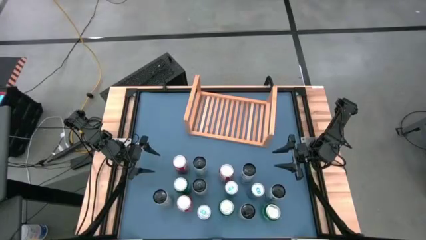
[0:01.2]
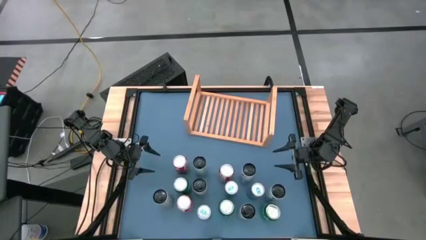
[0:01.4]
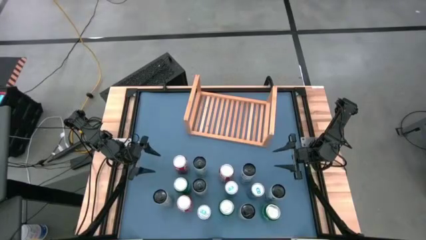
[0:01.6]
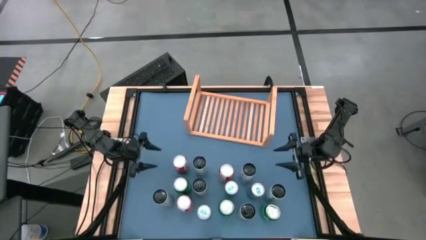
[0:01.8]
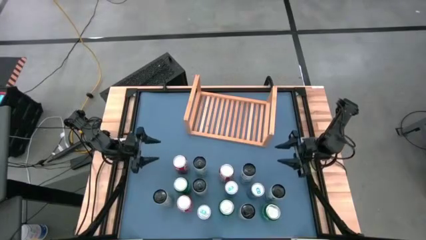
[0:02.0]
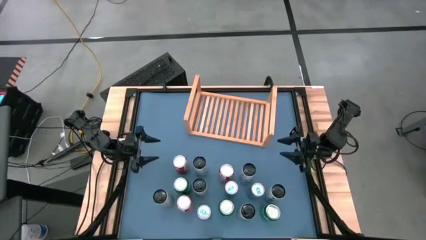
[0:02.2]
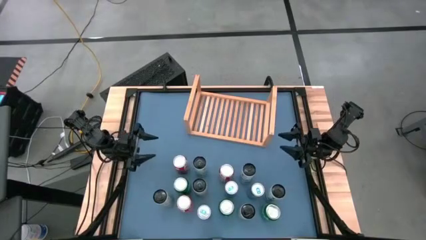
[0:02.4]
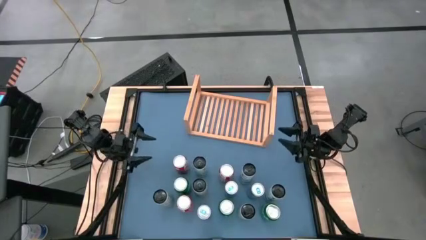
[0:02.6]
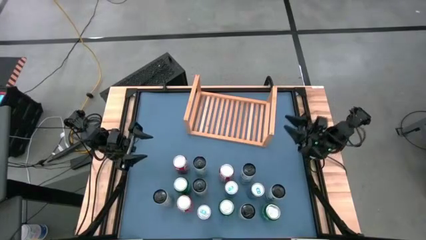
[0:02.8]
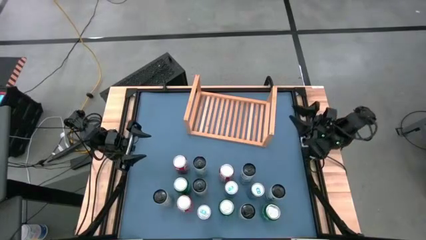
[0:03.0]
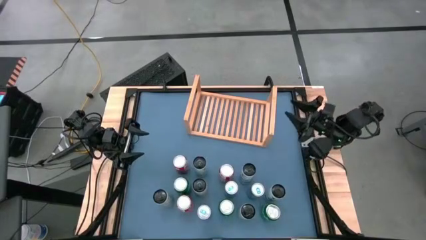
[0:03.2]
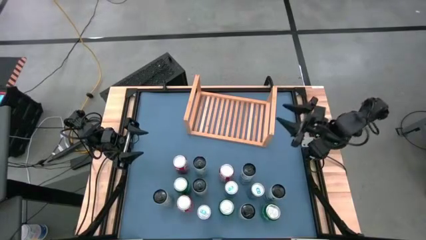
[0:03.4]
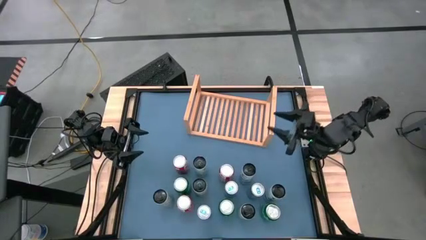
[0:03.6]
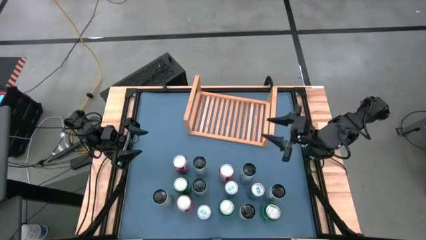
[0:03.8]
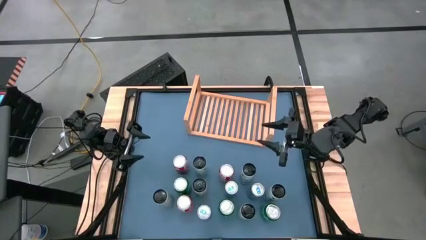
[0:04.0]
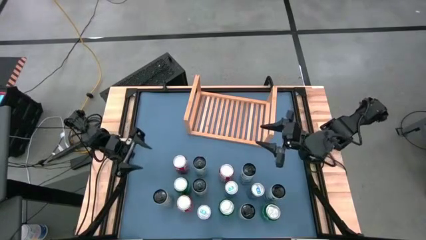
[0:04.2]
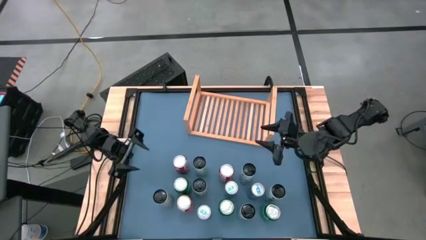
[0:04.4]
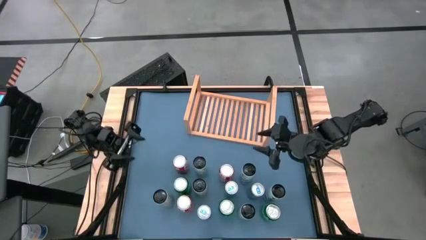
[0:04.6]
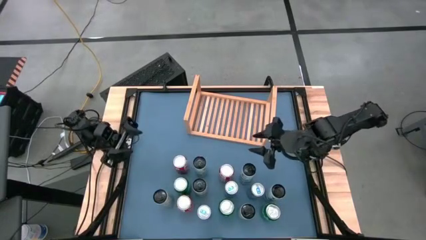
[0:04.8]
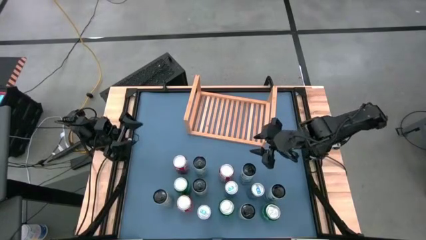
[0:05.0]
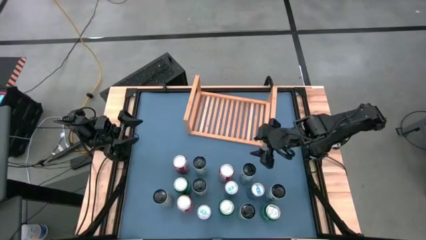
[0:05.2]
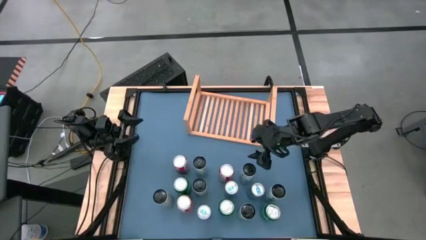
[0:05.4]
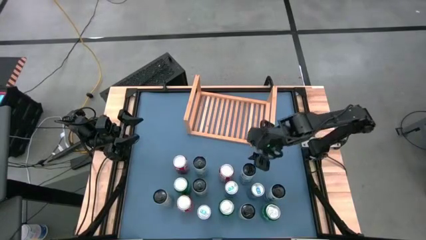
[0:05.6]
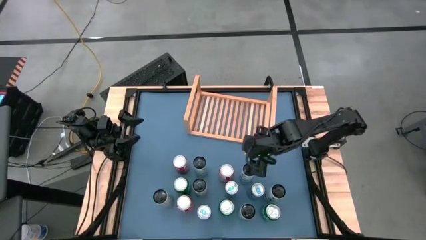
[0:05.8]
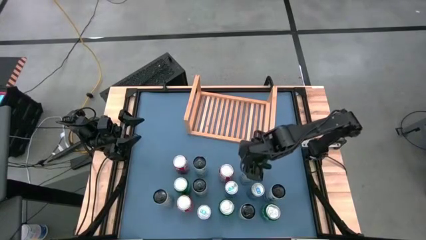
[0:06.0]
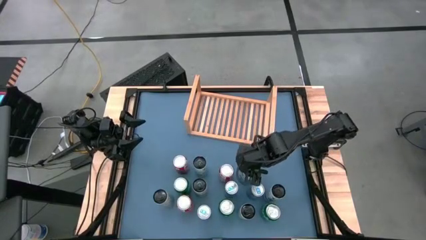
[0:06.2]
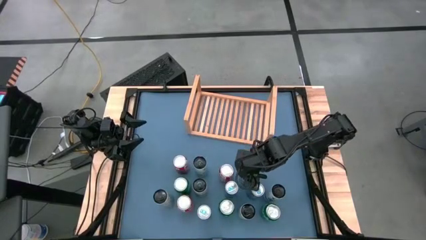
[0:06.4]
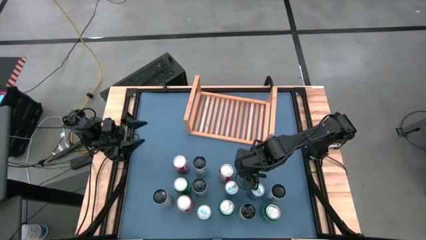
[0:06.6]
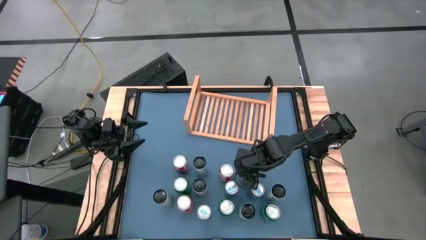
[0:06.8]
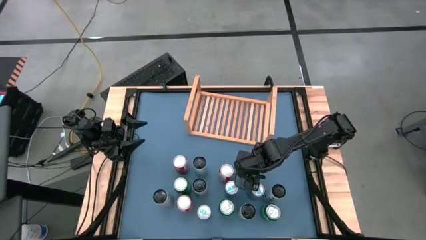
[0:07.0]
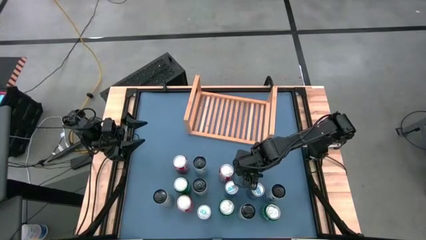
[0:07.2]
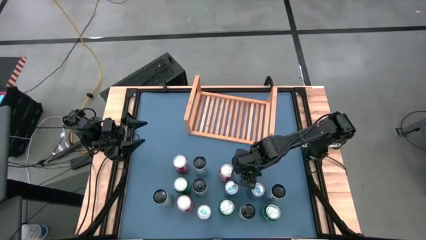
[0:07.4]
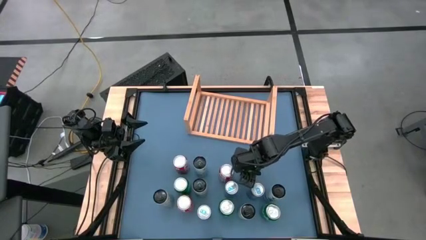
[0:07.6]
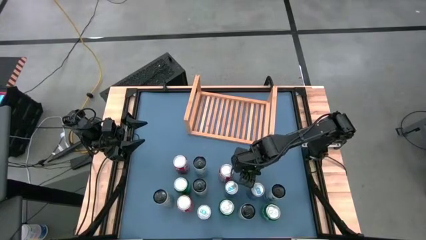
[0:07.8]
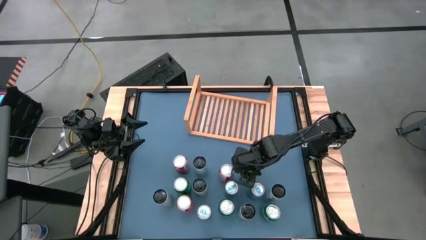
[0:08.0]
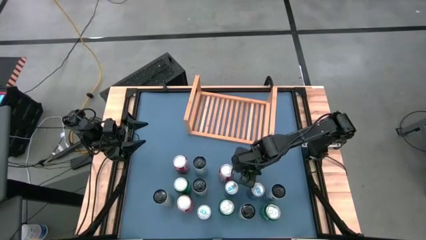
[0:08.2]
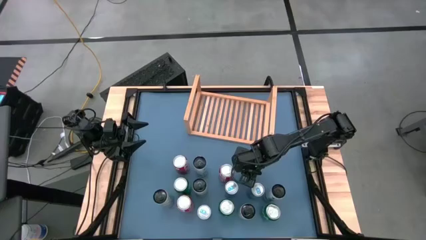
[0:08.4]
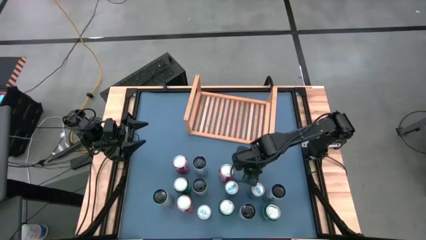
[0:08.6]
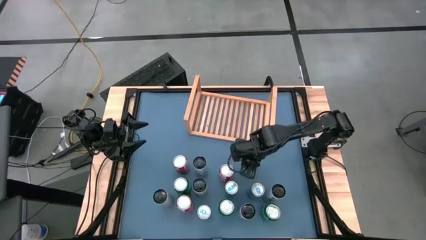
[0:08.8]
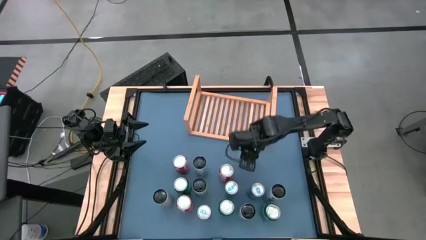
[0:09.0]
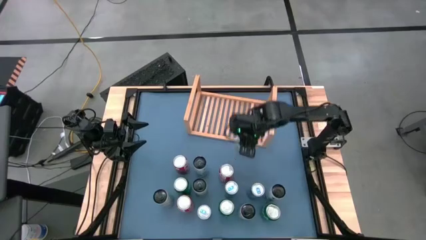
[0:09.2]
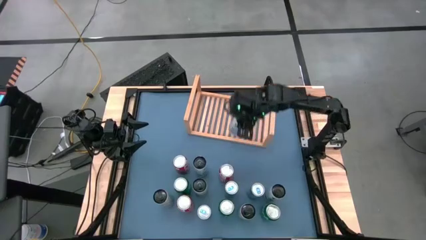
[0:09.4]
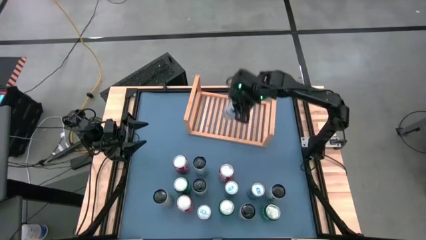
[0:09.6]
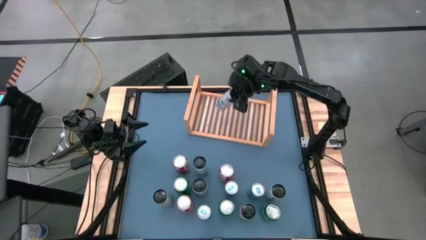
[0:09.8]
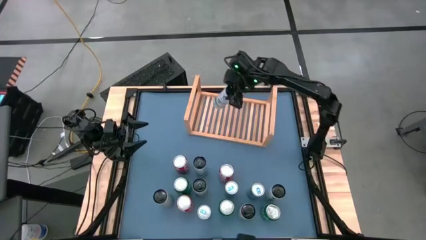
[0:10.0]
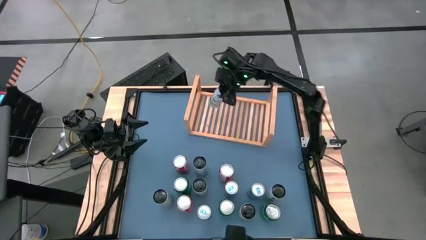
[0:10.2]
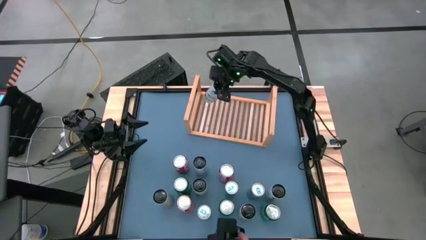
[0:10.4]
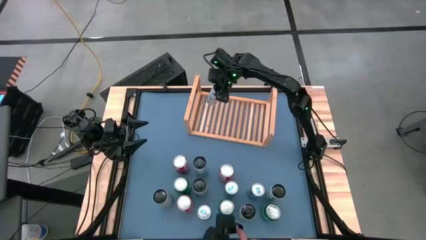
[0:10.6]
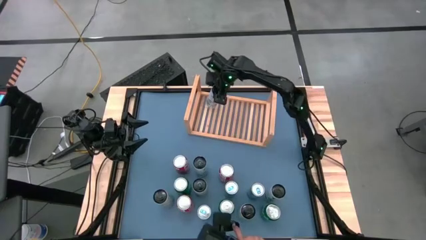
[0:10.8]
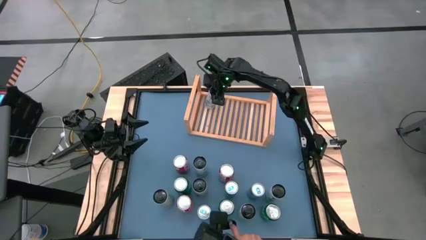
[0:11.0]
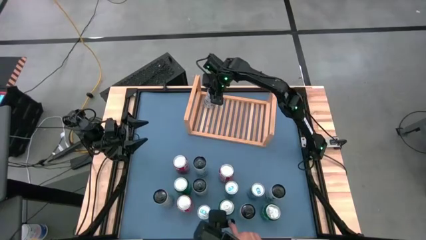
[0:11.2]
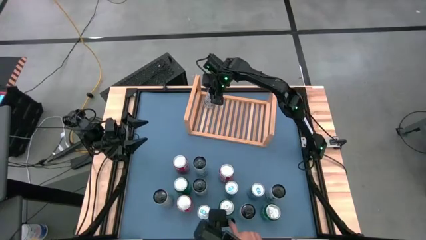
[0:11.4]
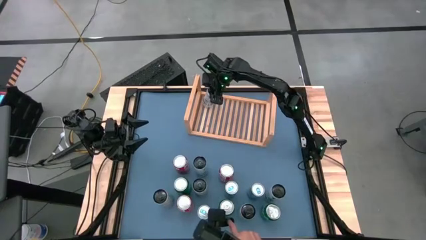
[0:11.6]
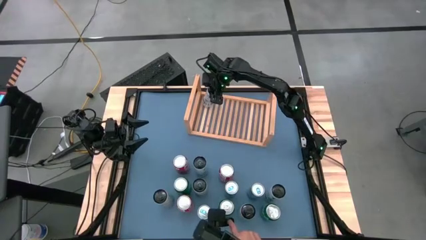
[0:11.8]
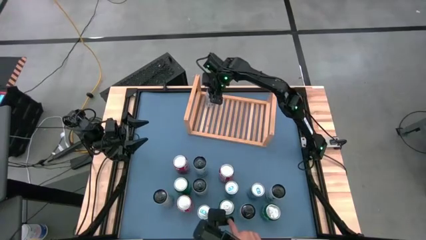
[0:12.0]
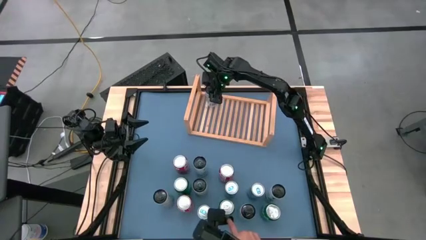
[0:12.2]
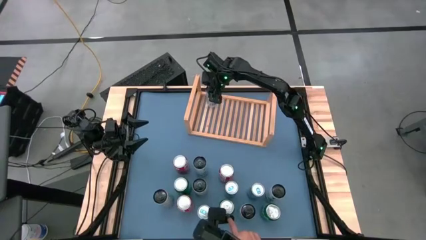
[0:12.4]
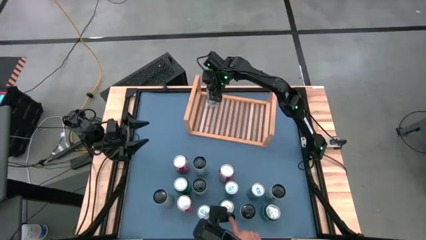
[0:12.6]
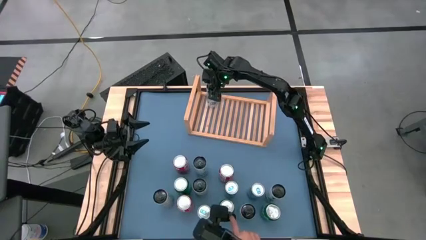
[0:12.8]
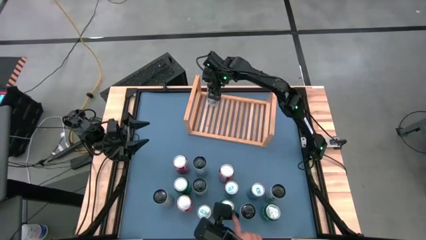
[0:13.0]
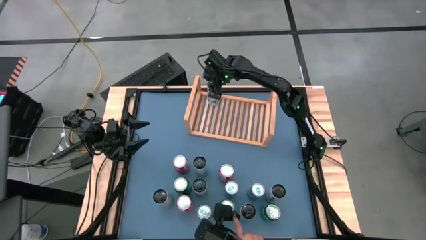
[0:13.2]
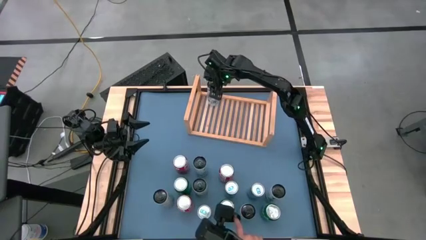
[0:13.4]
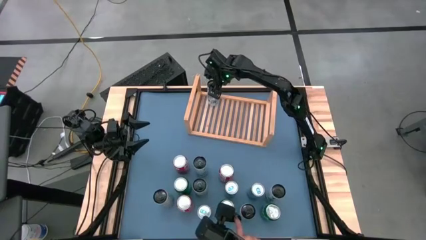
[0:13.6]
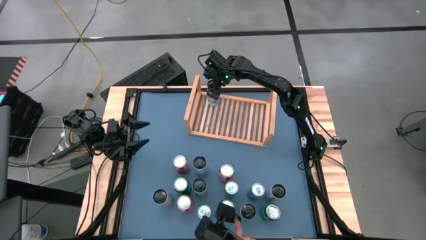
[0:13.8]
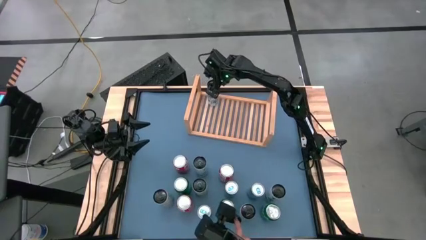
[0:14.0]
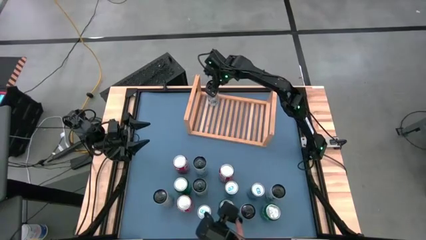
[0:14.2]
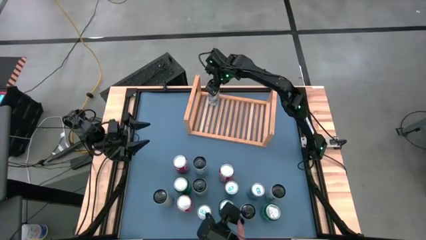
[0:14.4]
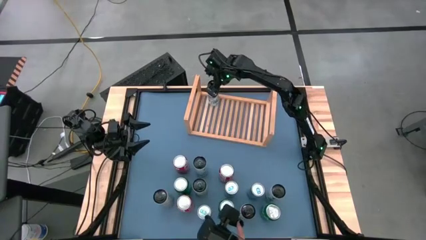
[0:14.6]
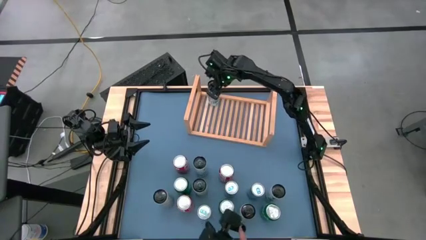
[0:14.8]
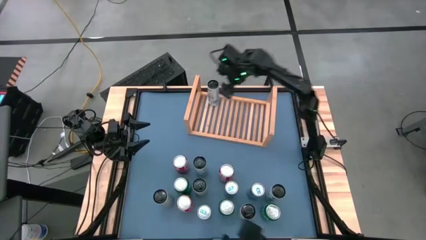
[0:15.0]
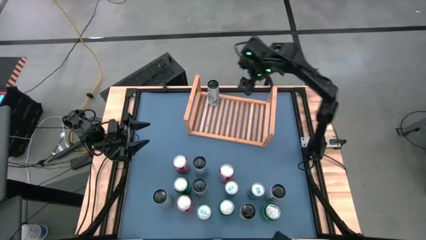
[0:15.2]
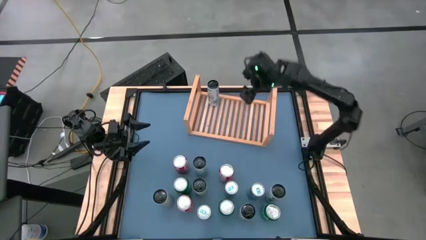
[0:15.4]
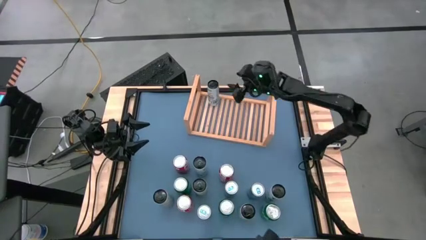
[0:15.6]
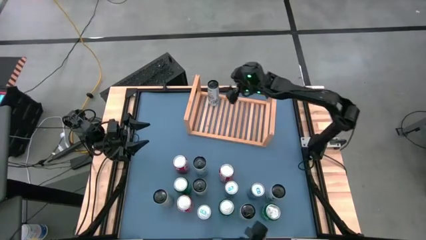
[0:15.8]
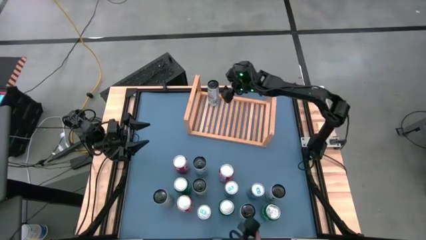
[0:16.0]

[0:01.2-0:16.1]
Task: Place canned beverage on shelf
Put the white blue soda can on the shelf
